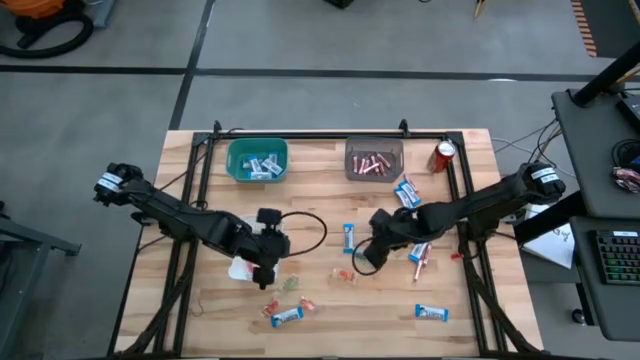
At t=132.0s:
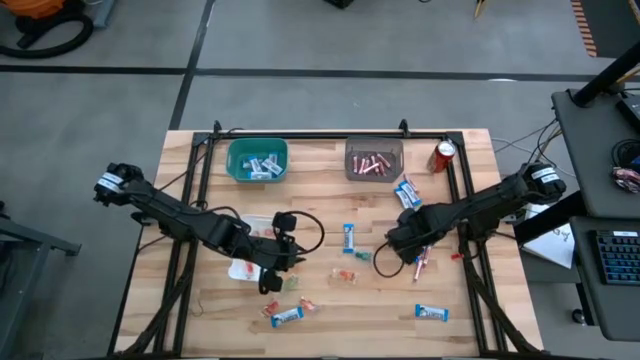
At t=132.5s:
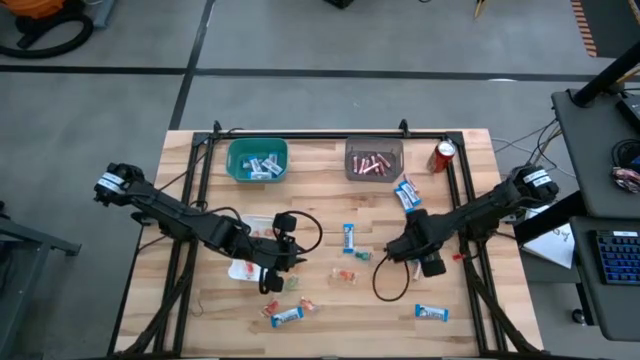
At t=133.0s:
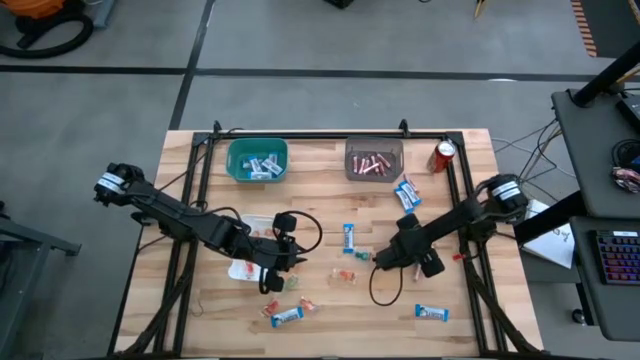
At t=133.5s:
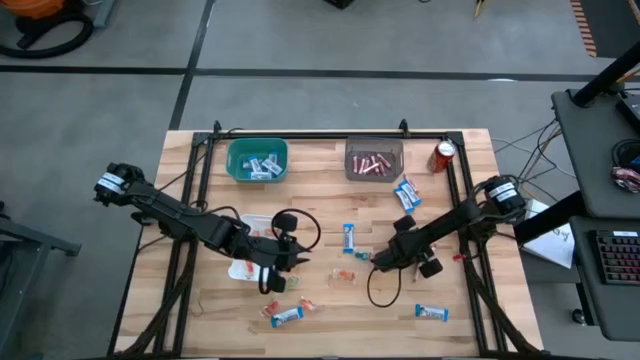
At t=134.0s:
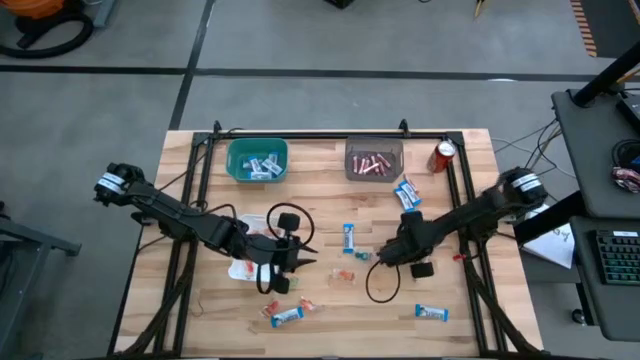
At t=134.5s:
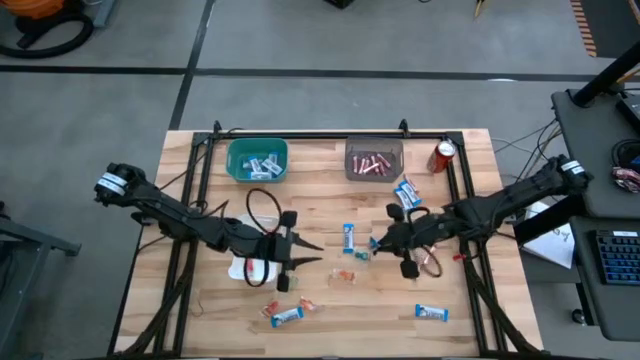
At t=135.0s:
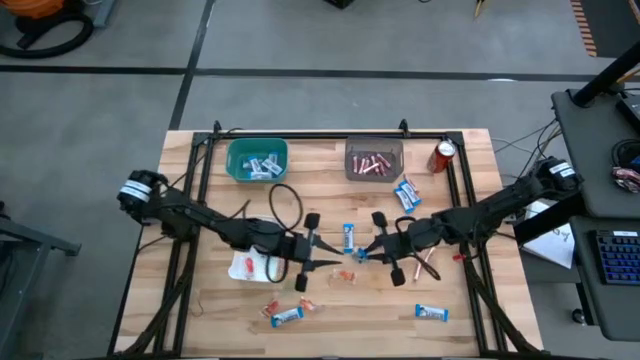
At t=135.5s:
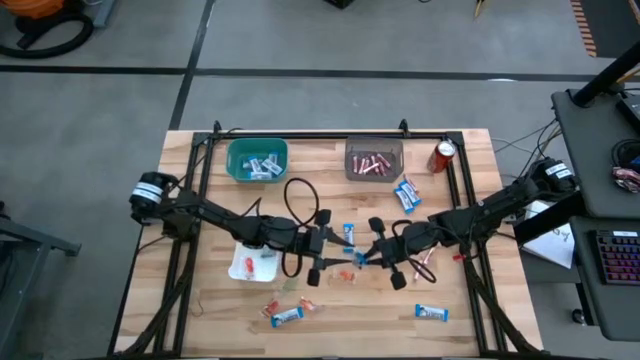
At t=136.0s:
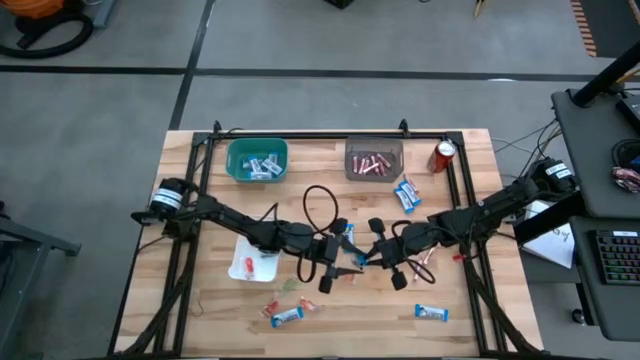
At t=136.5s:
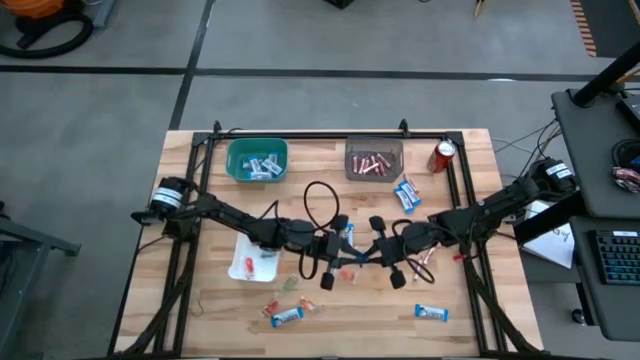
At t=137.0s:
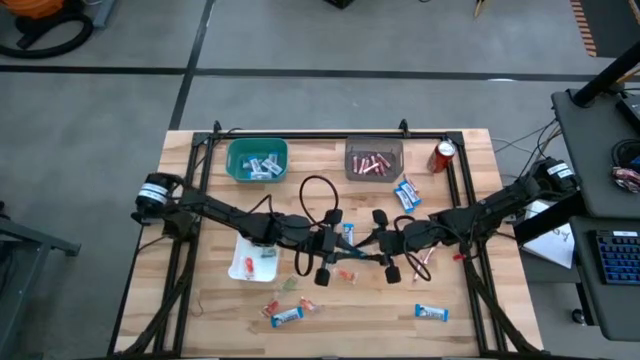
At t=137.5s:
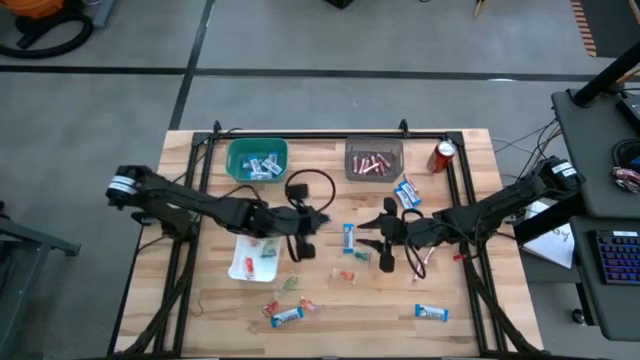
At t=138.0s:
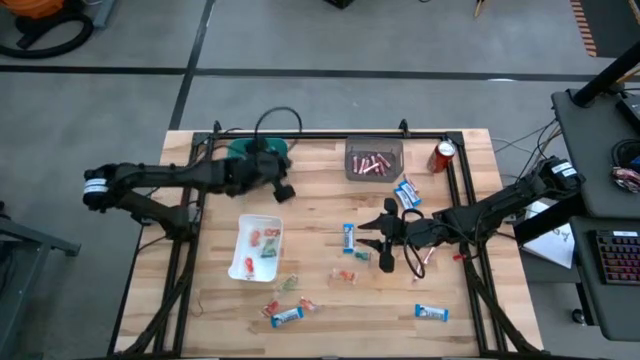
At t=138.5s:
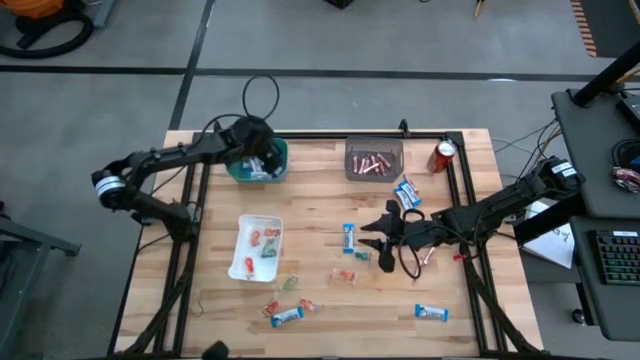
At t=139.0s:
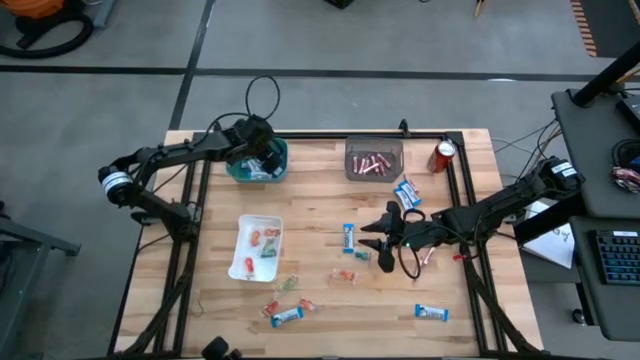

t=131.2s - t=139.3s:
Task: Sort candy
Put the white chocolate bar into the green bin

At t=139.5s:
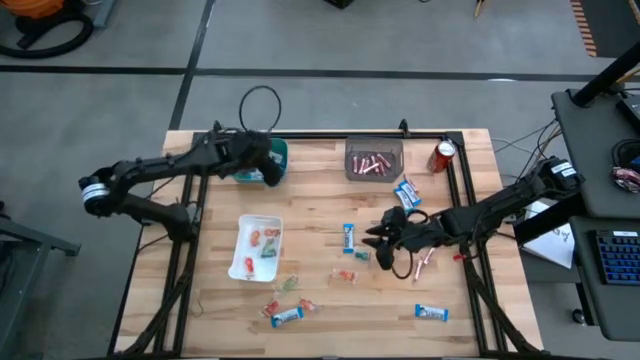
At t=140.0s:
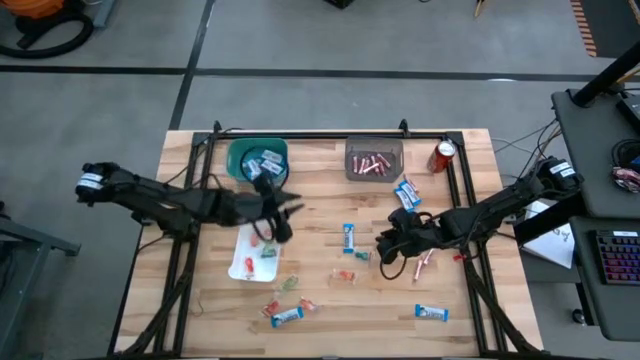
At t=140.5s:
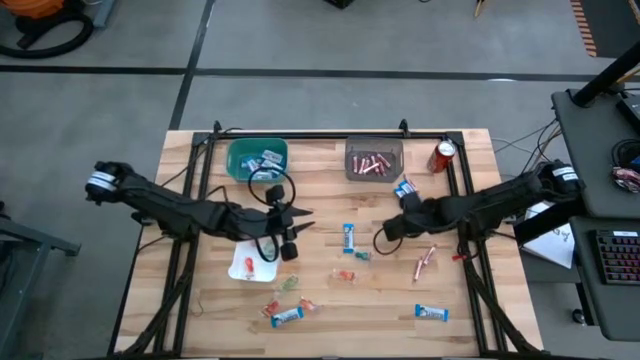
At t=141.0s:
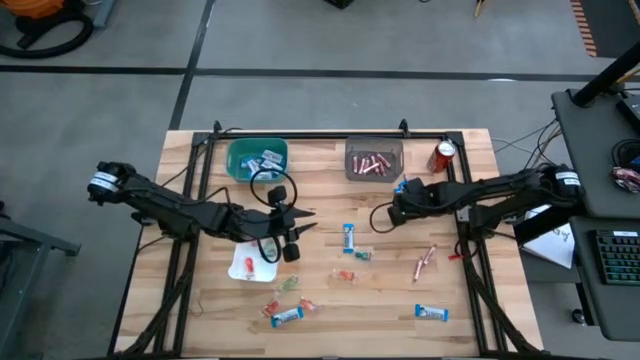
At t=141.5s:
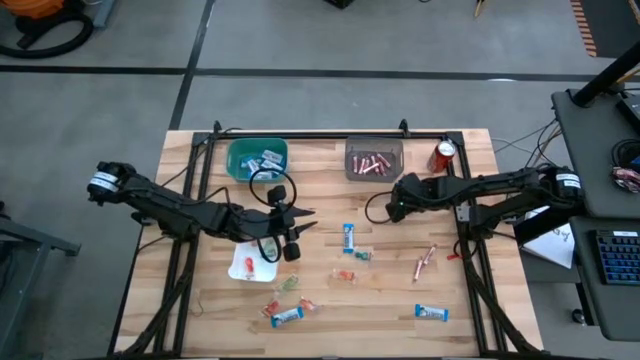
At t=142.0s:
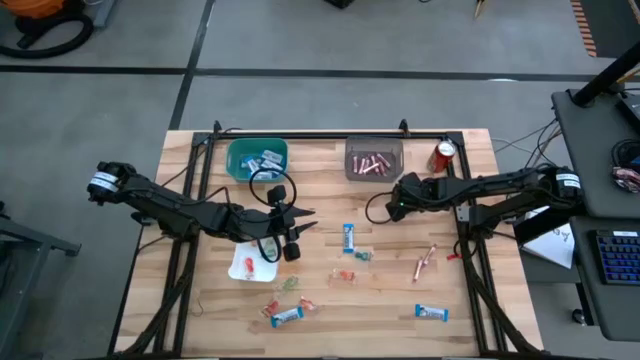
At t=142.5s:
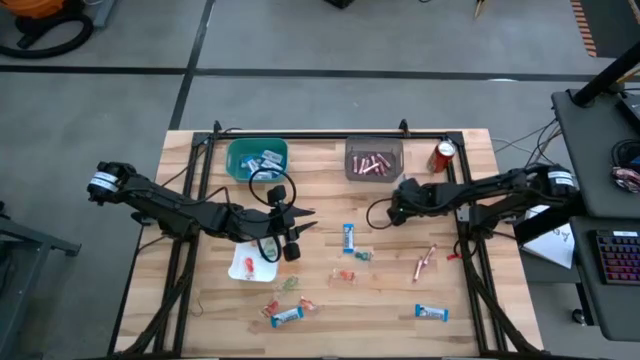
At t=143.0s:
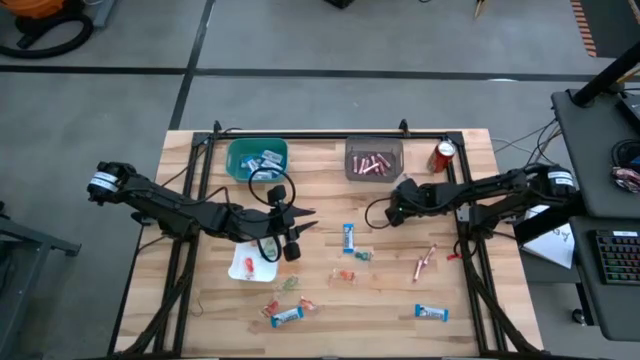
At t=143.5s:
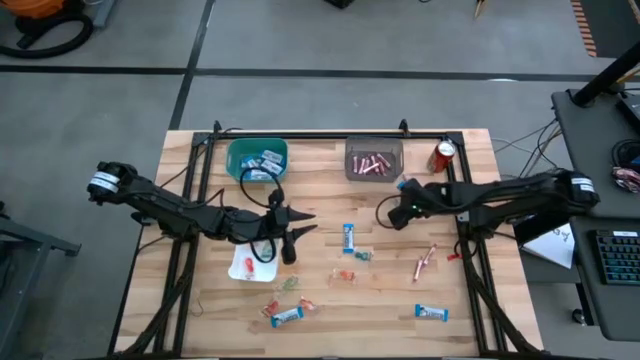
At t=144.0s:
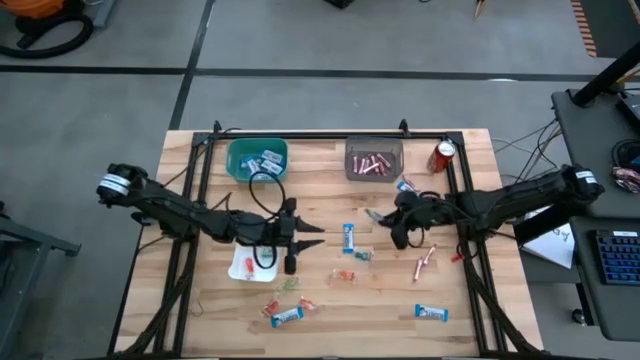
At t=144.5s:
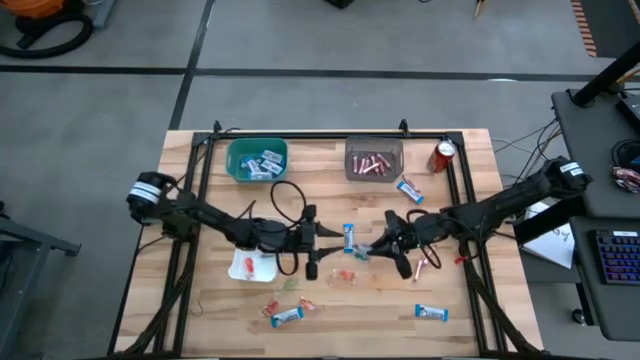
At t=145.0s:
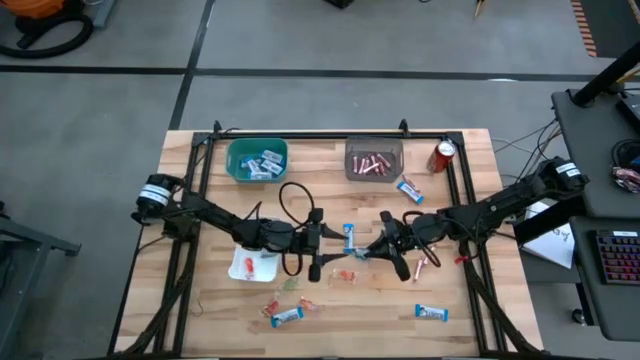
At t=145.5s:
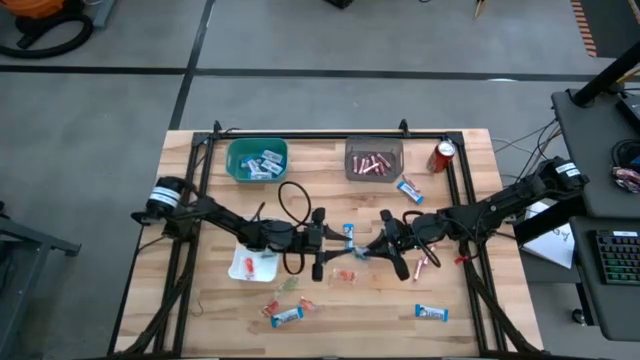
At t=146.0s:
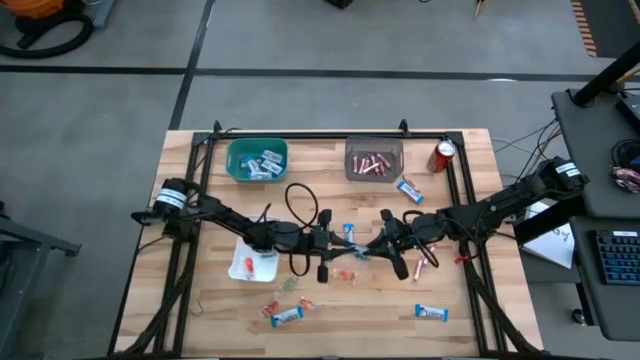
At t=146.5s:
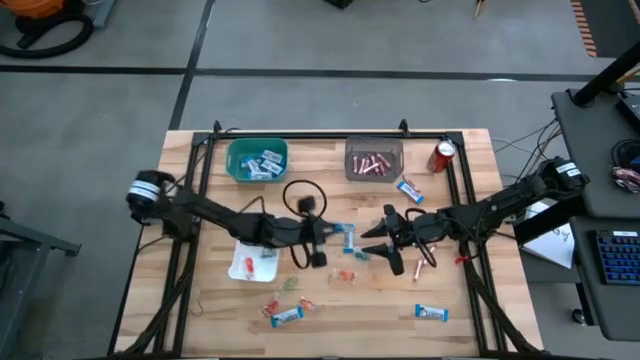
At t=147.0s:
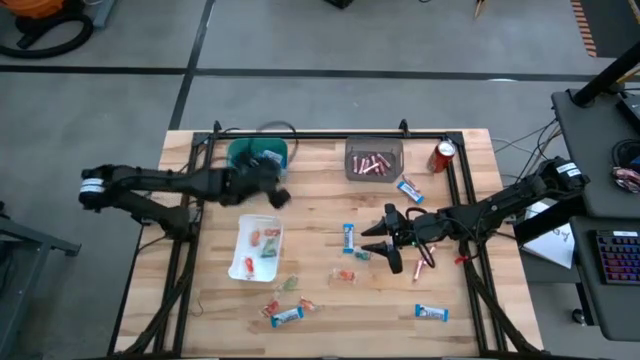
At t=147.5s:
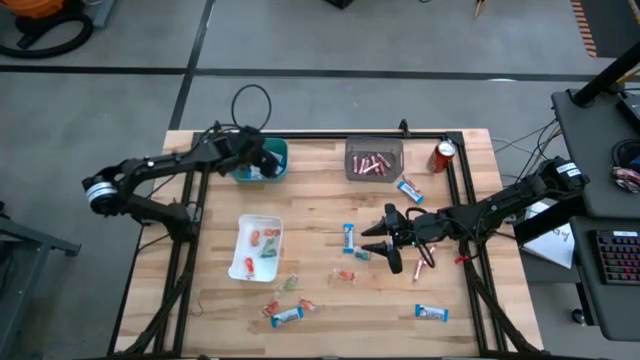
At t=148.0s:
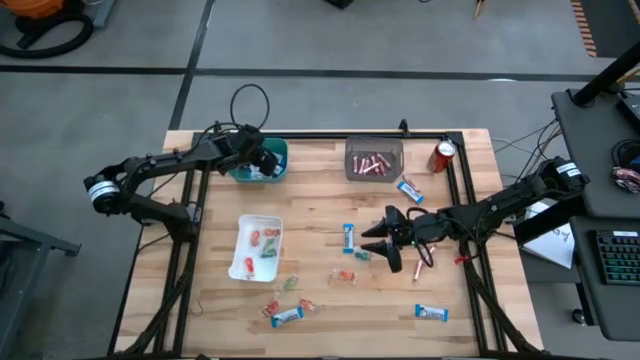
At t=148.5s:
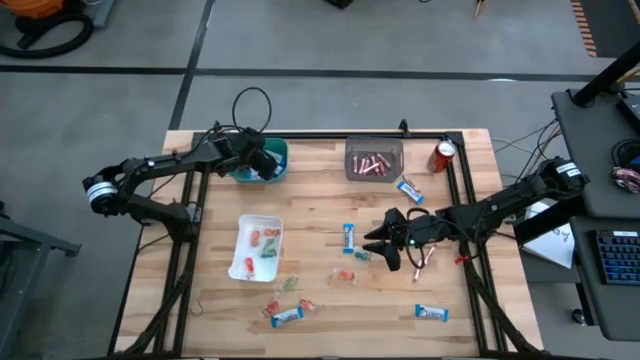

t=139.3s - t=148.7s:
Put the white chocolate bar into the green bin

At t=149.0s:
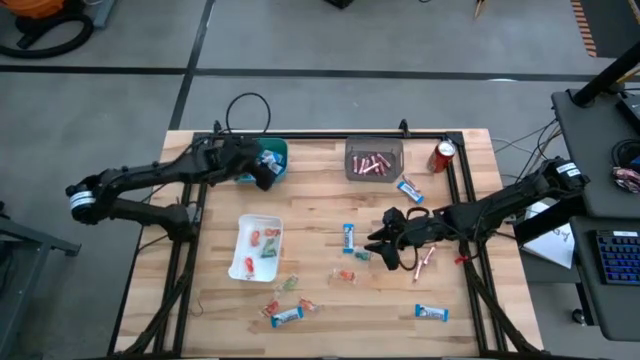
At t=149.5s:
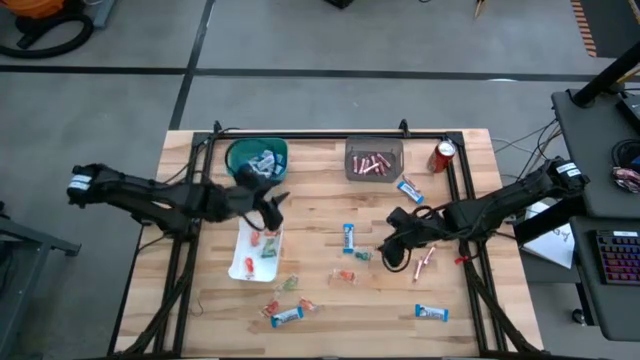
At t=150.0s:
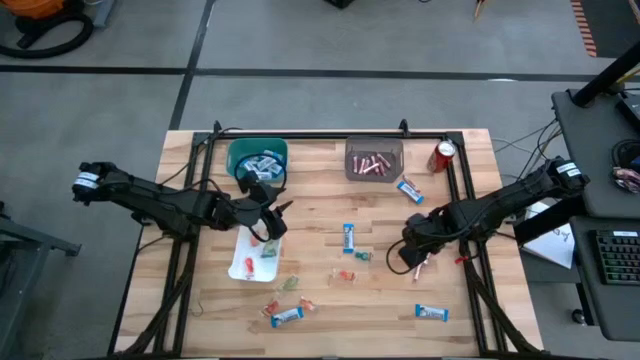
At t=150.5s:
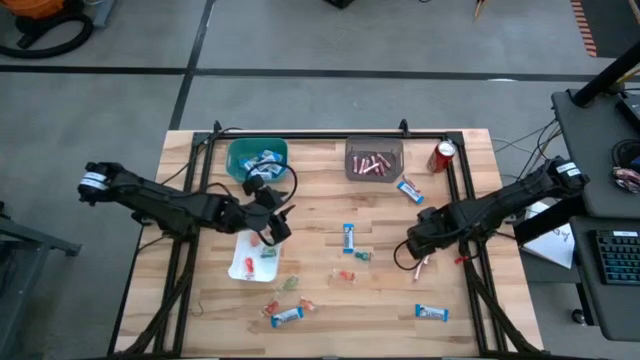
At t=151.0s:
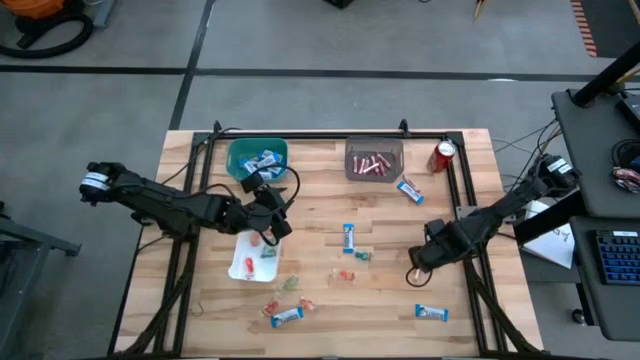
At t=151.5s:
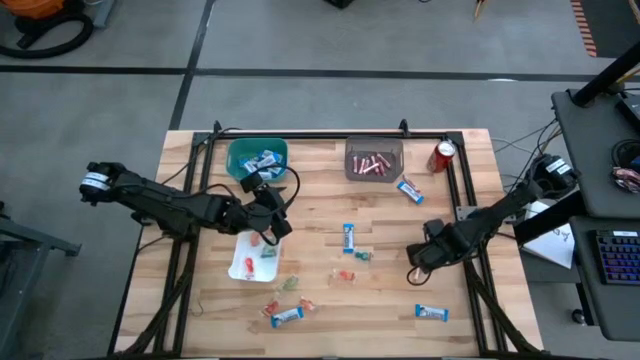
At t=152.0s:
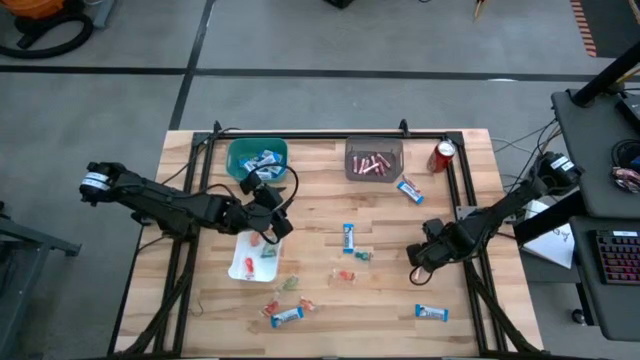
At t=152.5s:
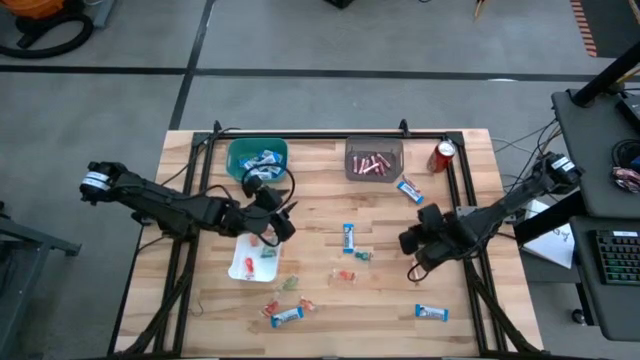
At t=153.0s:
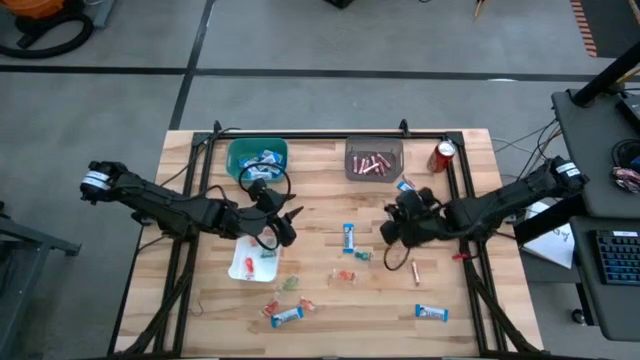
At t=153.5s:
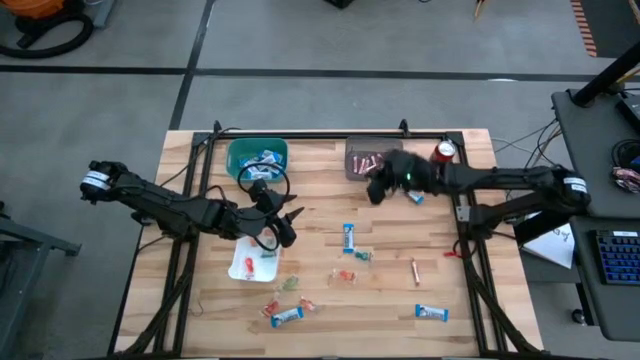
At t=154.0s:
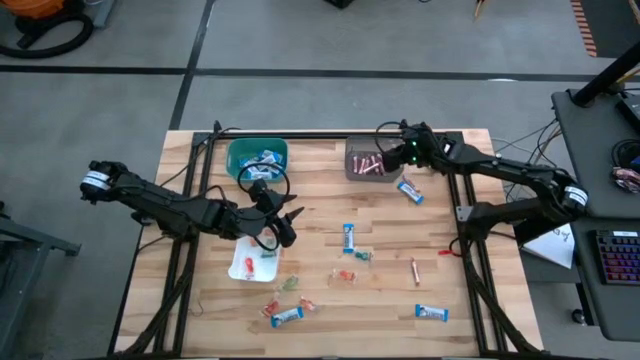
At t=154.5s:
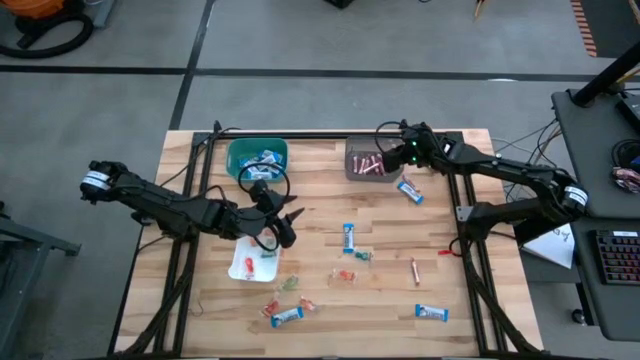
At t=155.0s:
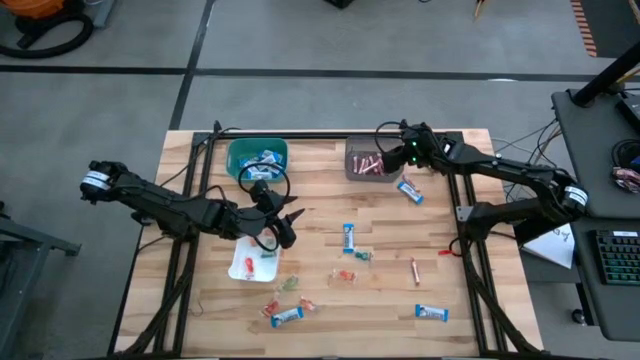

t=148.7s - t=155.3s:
Put the transparent candy rolls into the black bin
